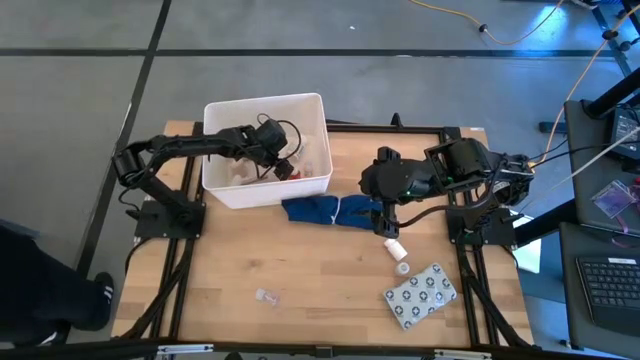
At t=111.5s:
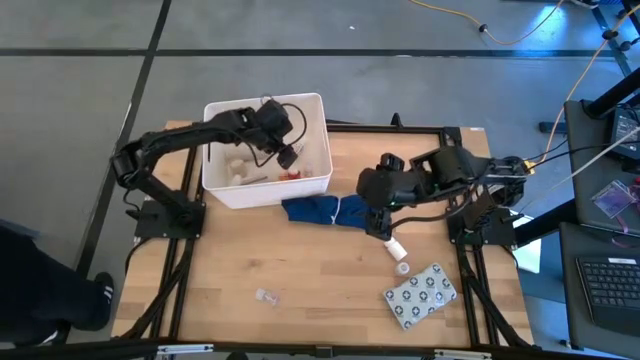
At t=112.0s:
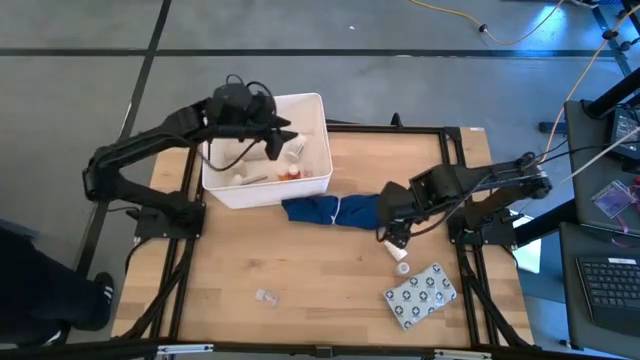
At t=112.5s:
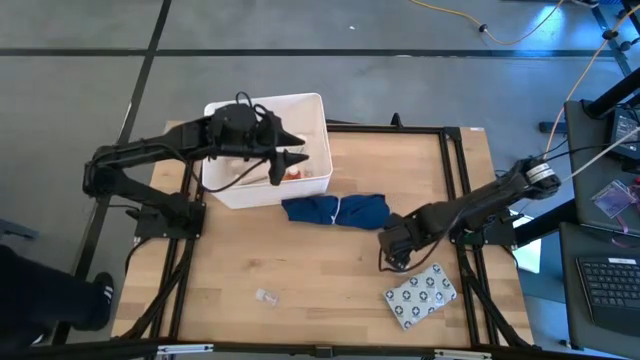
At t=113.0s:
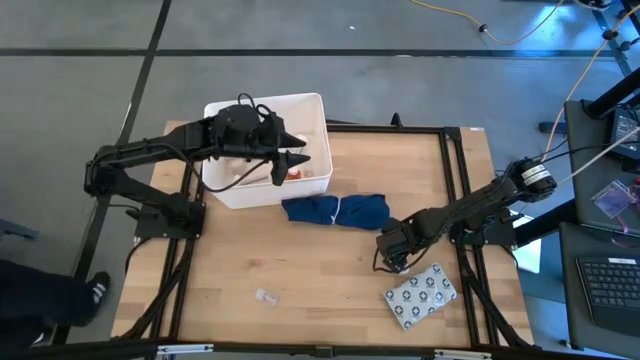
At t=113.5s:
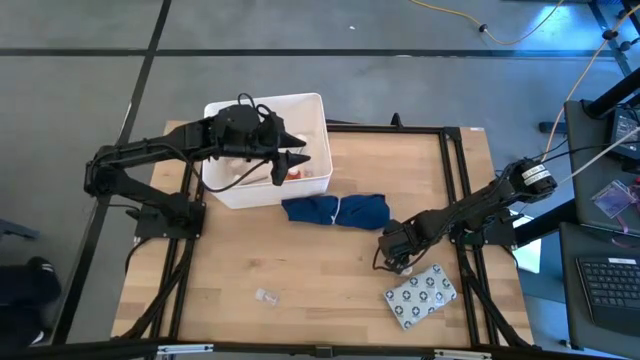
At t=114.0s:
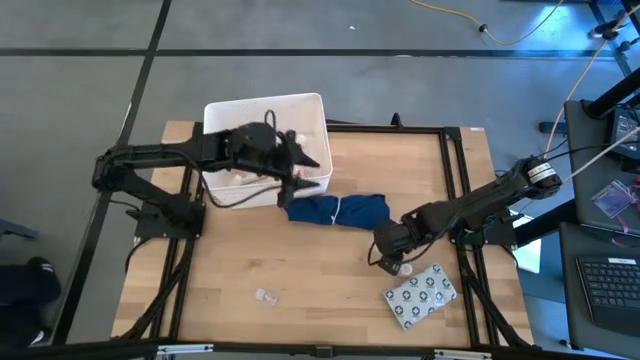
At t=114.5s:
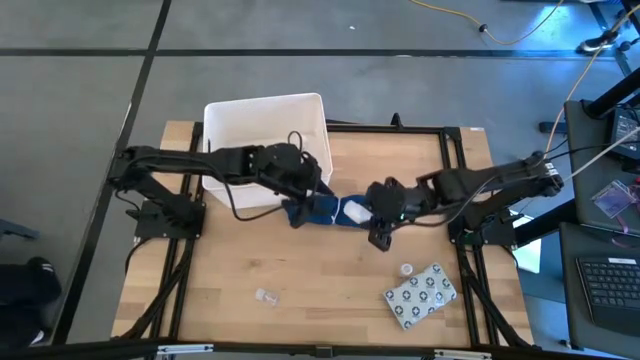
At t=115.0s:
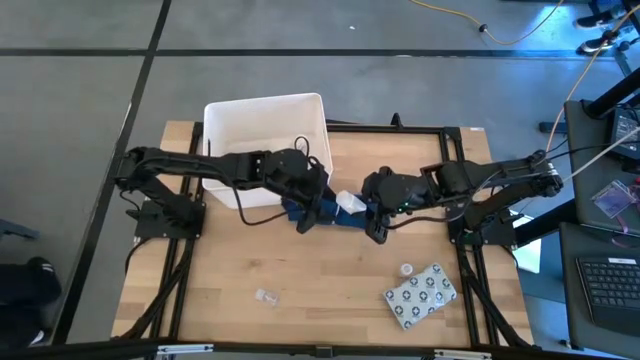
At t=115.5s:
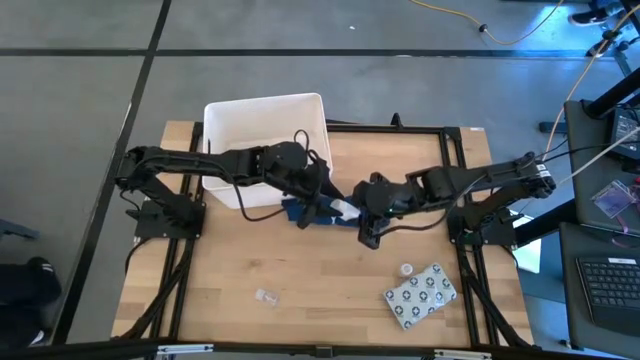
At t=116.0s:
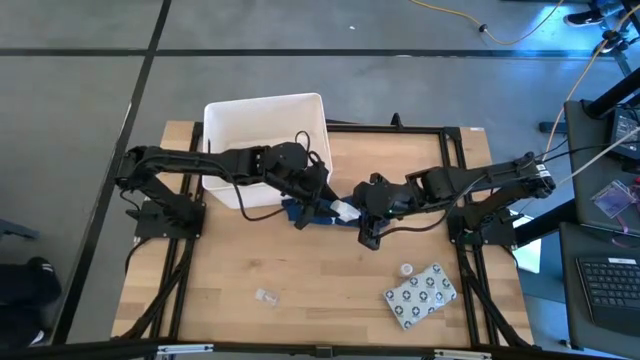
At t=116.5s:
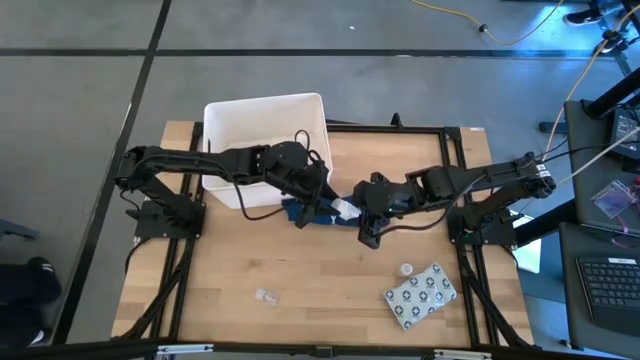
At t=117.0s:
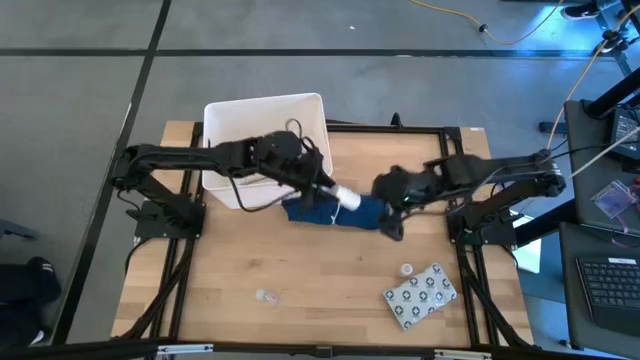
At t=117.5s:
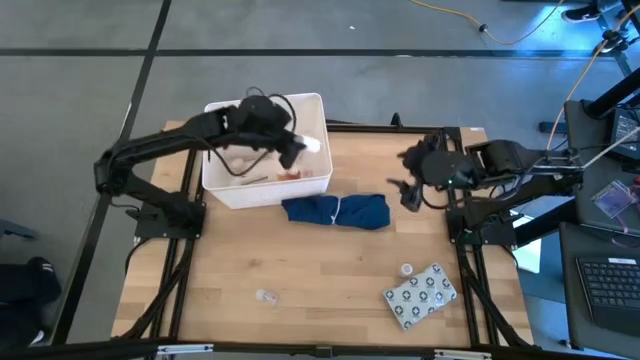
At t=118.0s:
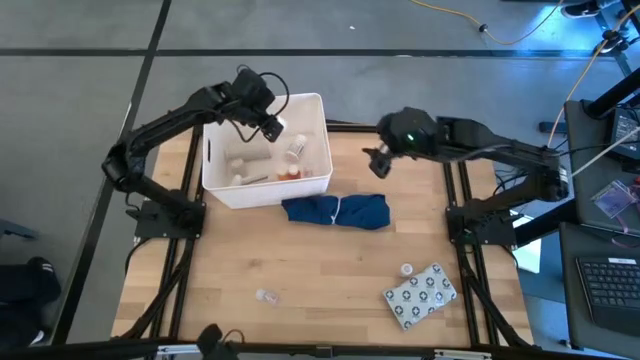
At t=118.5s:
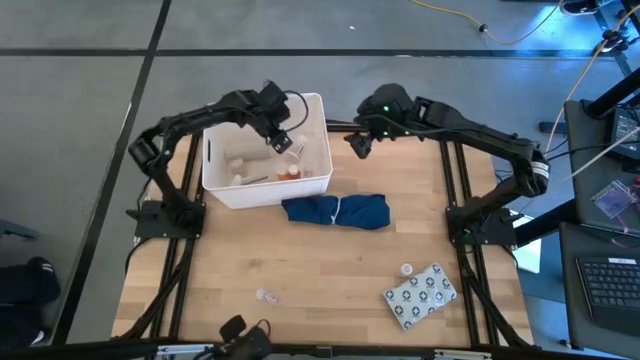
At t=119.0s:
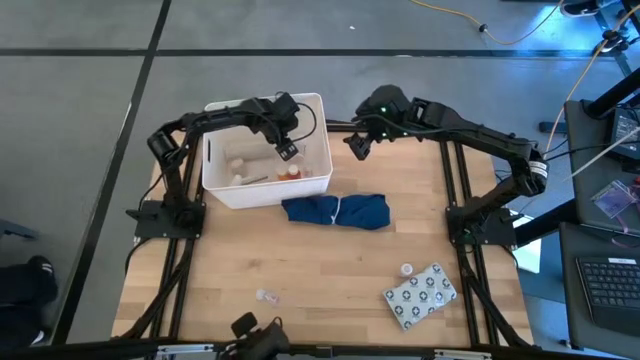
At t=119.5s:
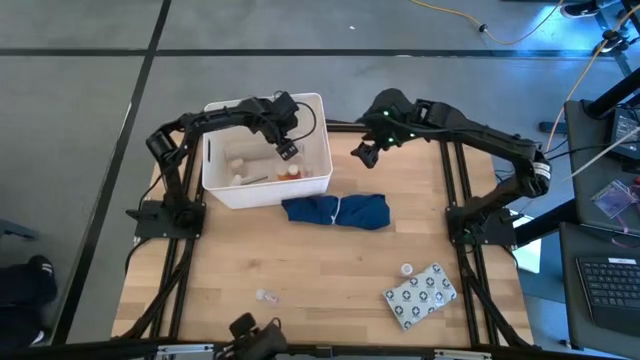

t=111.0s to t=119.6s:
Task: Pick & place medical supplies in basket/bin
Put the white pill bottle into the white container

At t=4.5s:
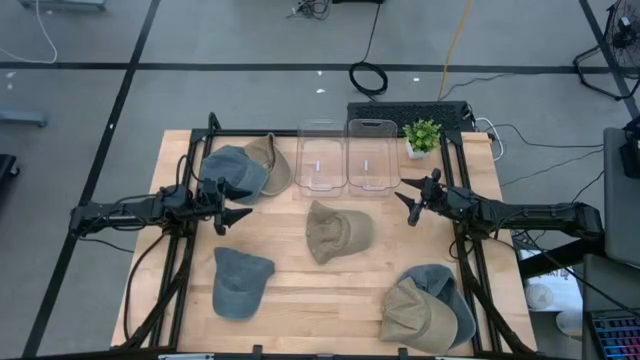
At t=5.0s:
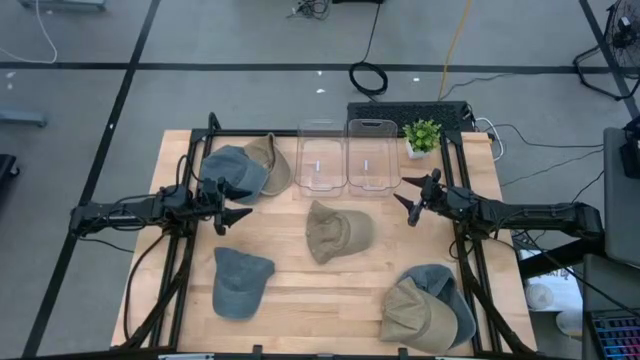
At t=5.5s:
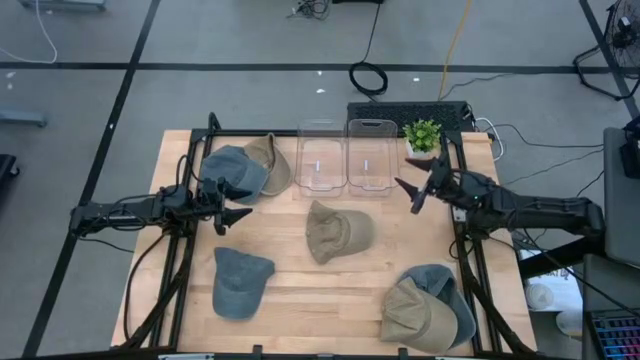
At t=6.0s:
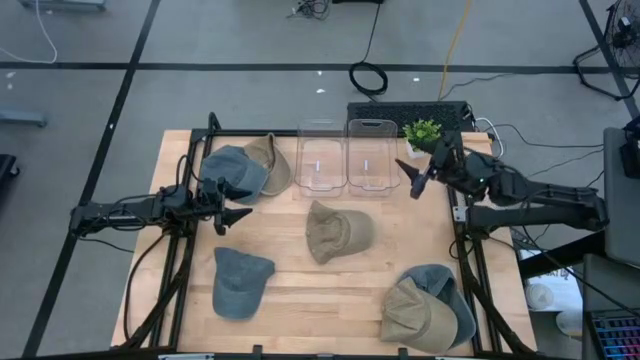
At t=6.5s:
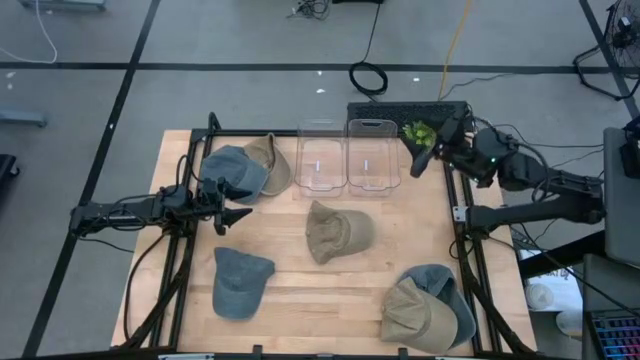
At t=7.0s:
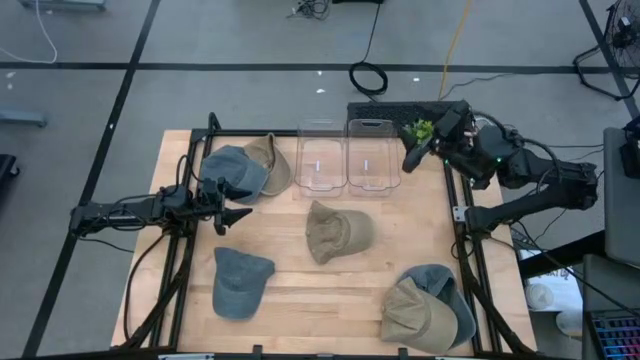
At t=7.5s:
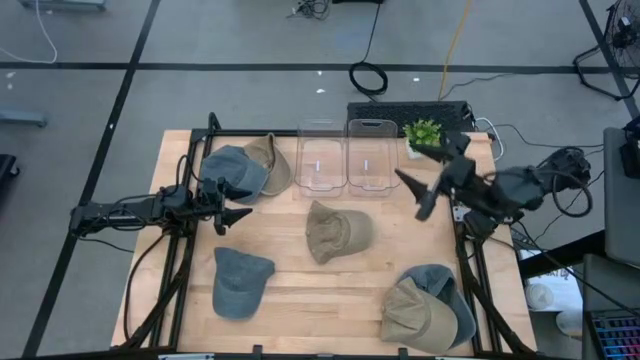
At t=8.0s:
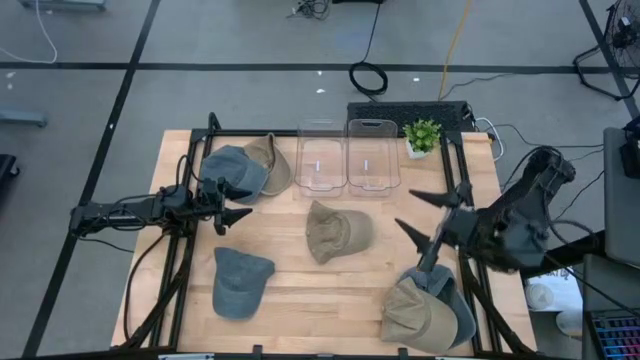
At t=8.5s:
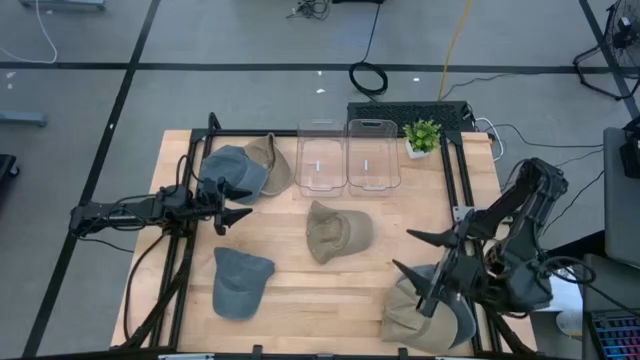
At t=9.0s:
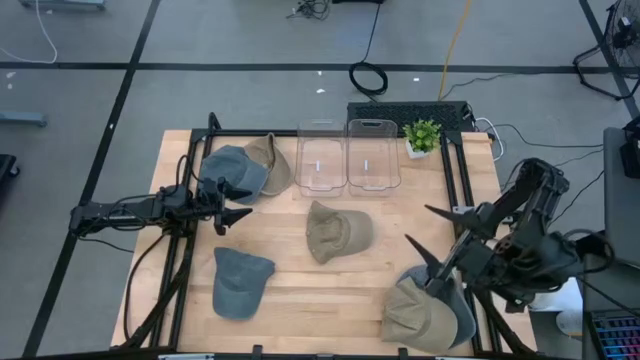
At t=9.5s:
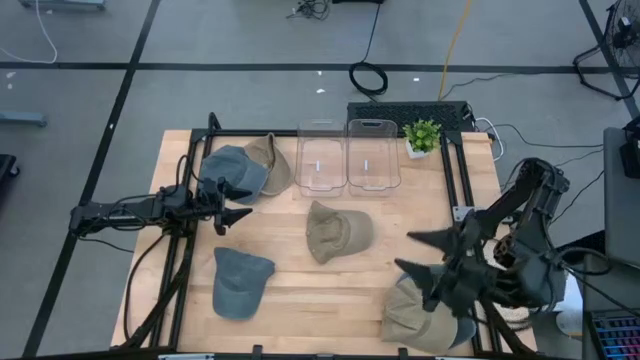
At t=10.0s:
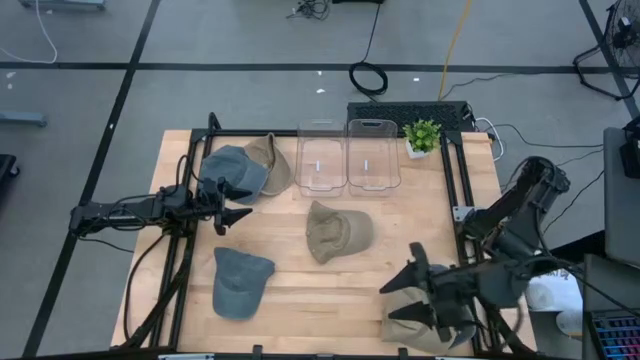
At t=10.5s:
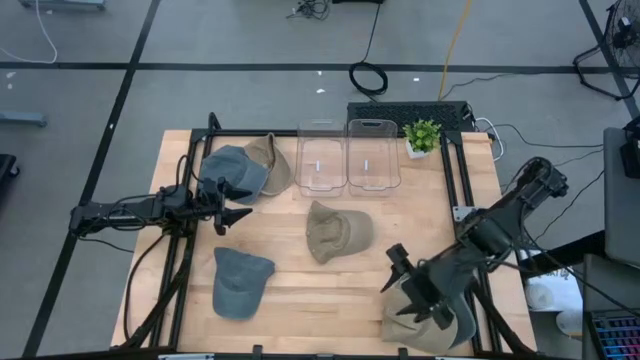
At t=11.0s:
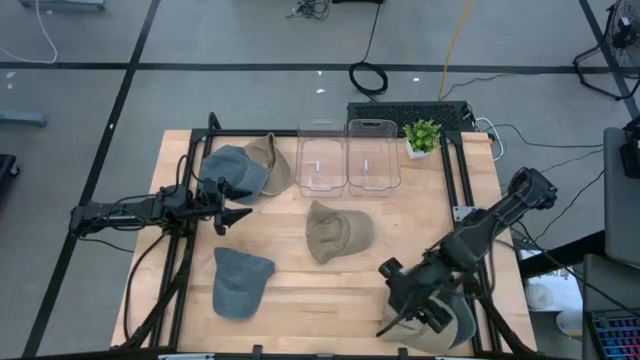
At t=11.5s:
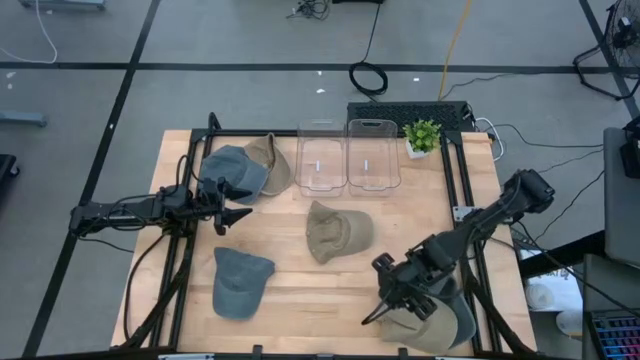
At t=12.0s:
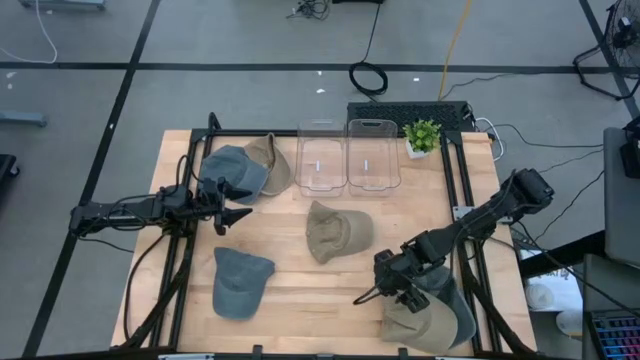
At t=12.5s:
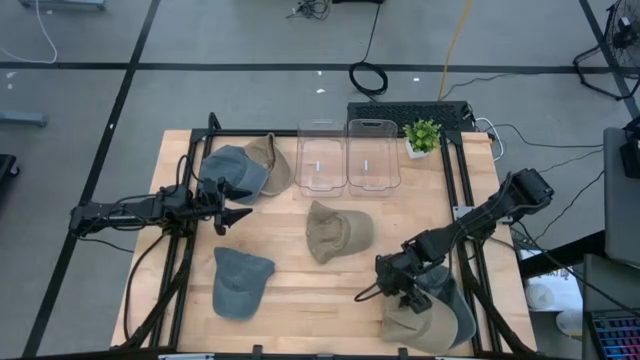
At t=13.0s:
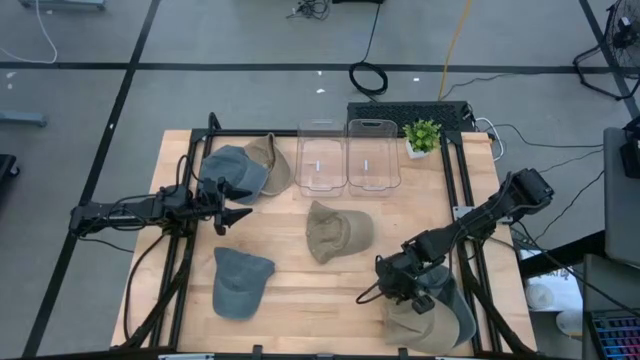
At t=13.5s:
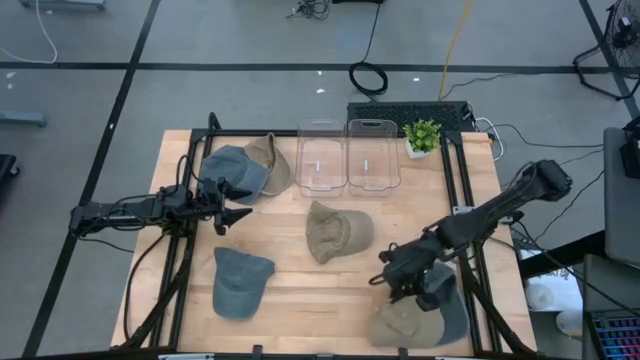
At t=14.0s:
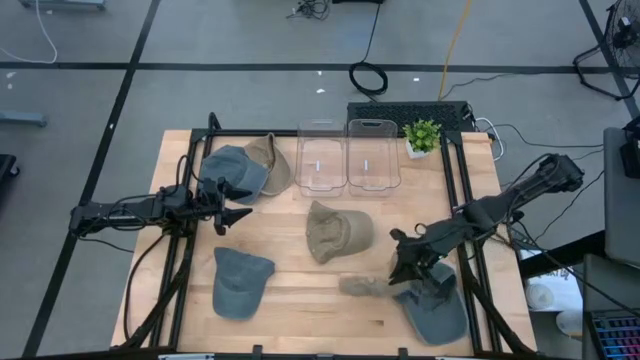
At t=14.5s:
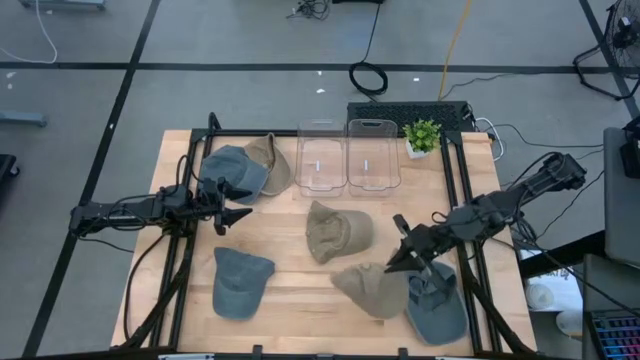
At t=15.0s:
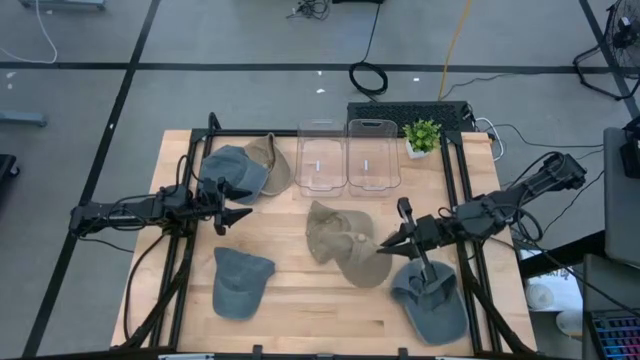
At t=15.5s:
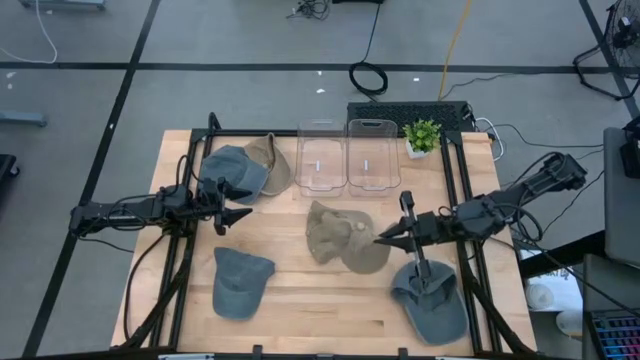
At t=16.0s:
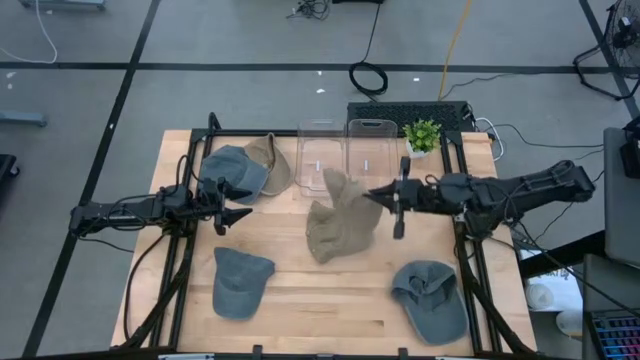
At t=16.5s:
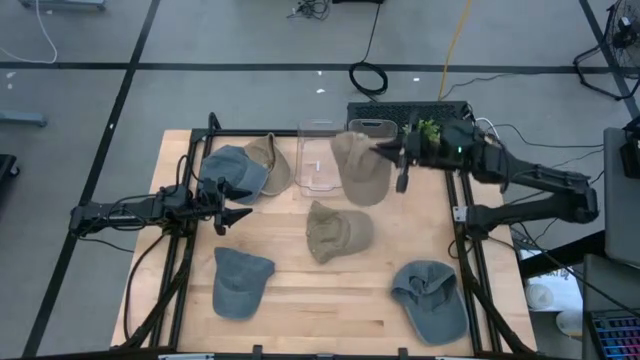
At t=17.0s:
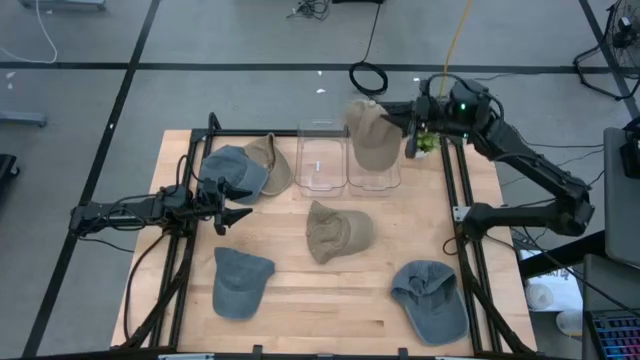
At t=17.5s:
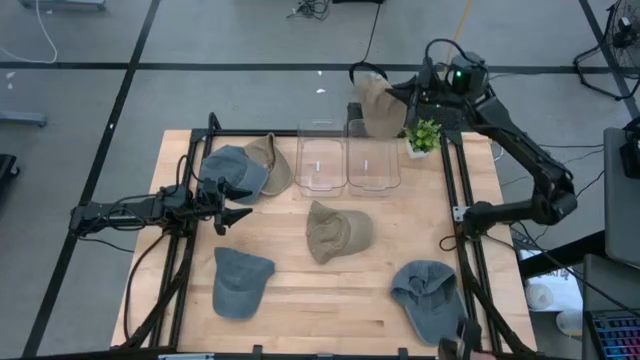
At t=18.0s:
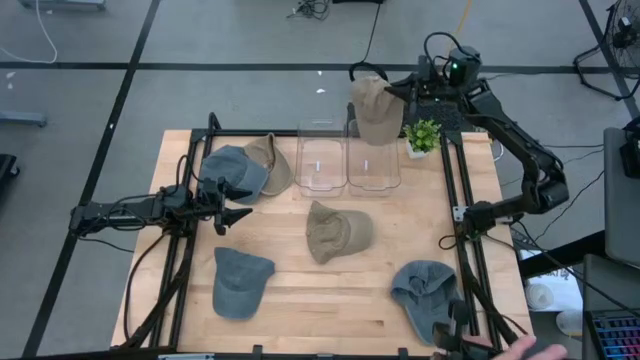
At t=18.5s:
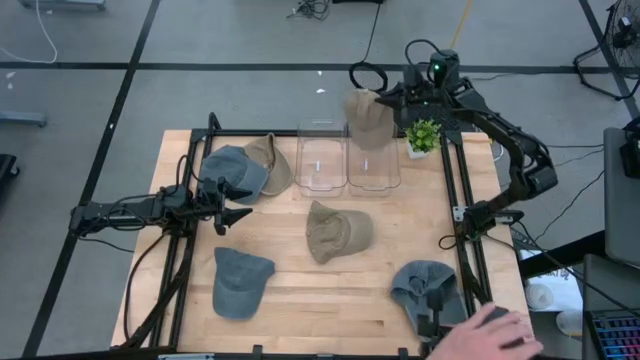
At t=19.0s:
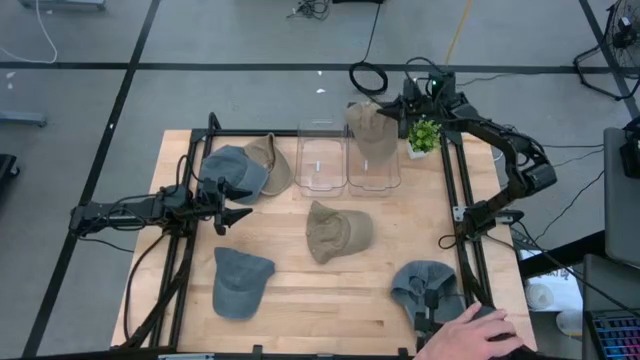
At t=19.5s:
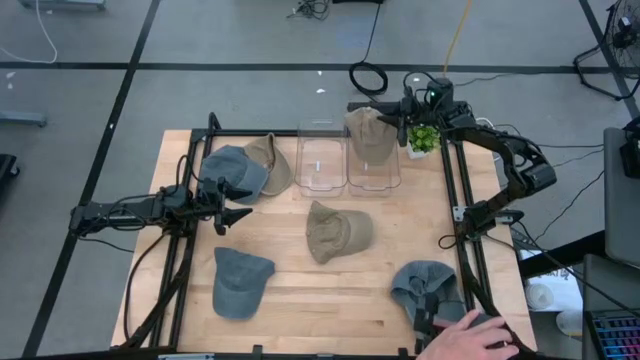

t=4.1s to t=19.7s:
Task: Pick & Place hat
Put the bottom brown cap into the right transparent bin
